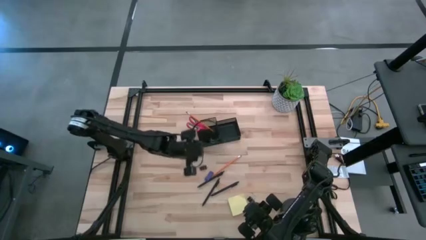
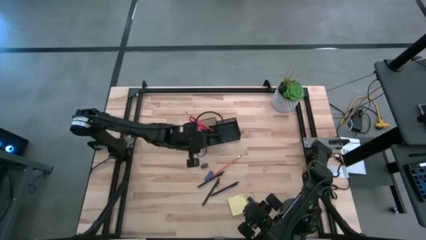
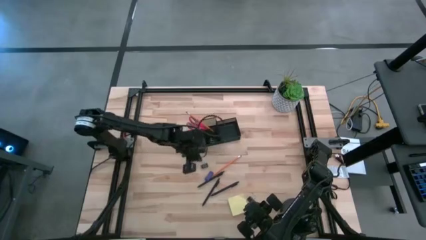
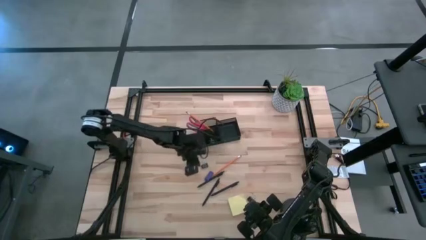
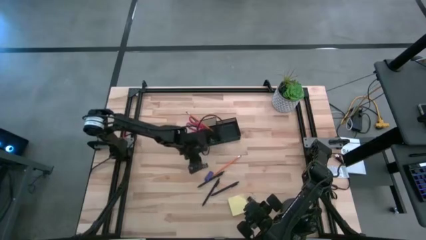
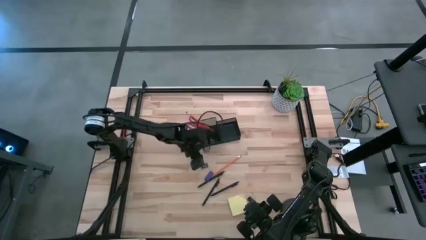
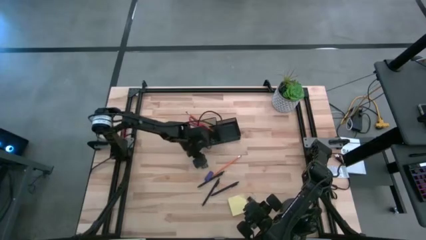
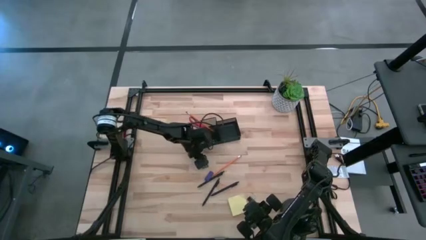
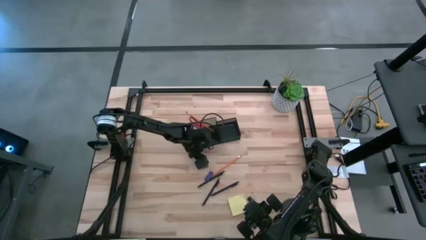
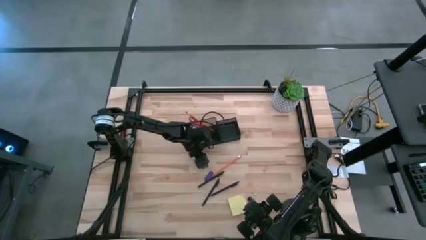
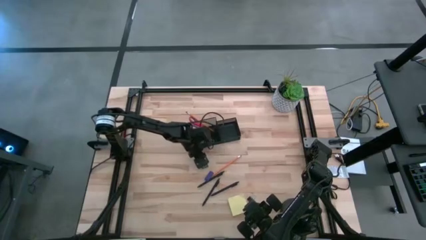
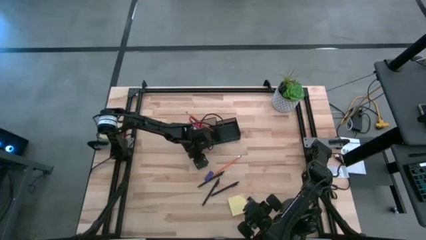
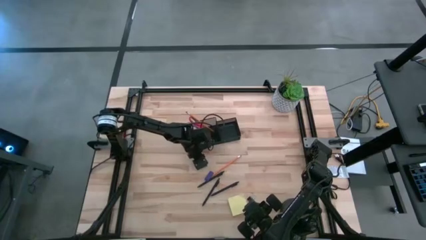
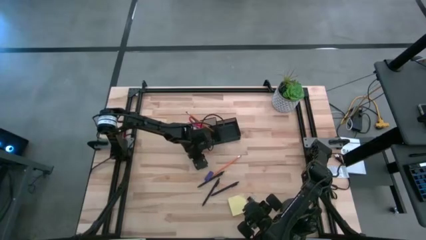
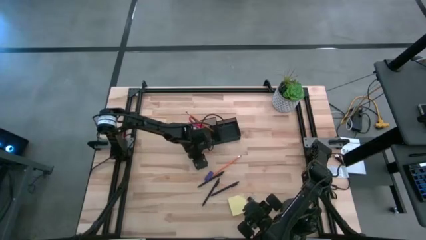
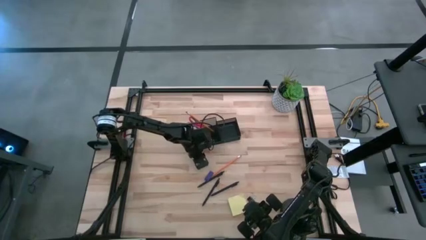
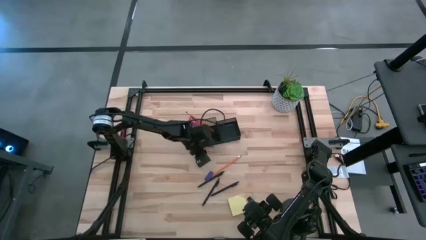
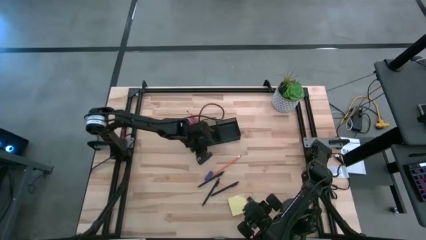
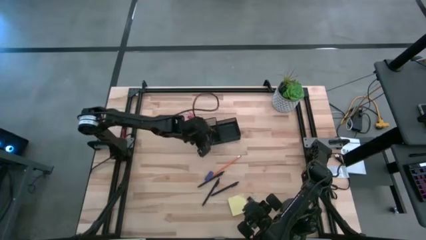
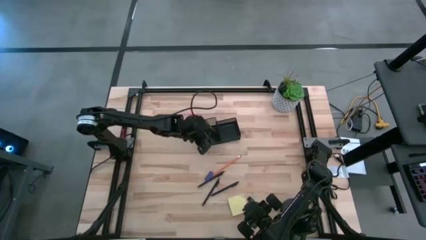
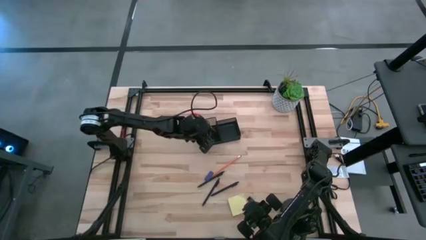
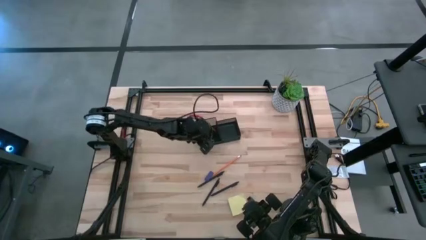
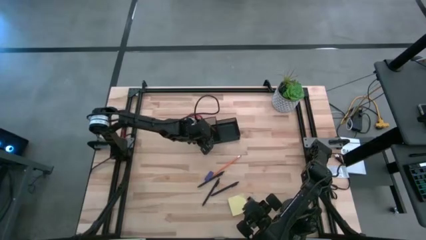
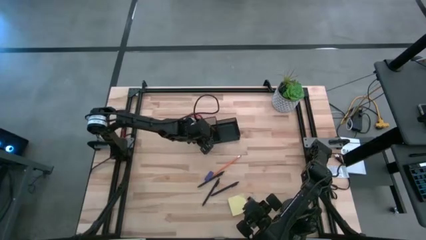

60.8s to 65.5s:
Task: Pick and place office supplies into organizer
Put the left binder clip into the bottom left section of the desk organizer

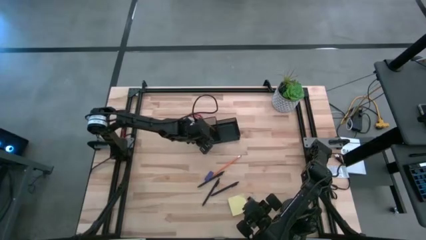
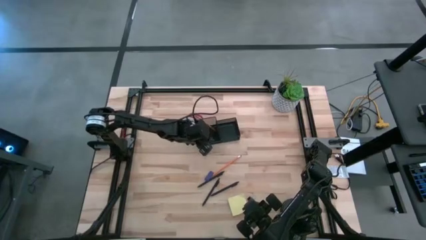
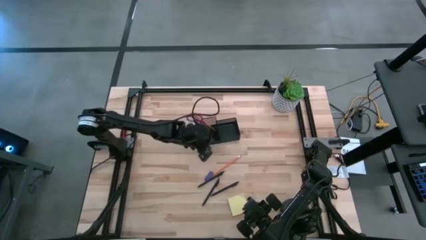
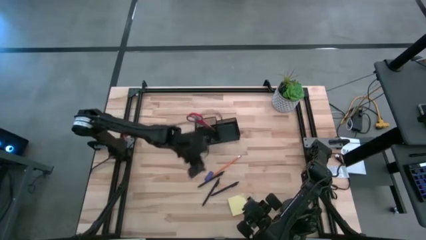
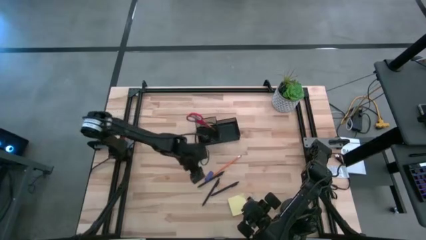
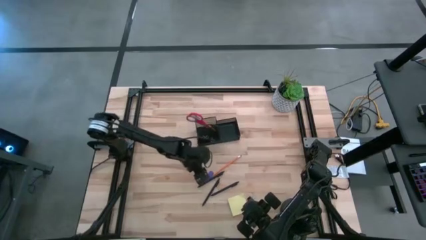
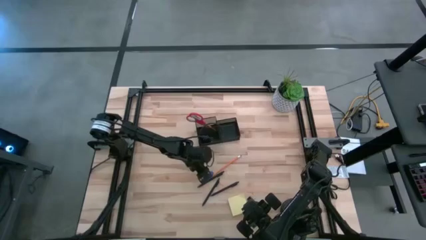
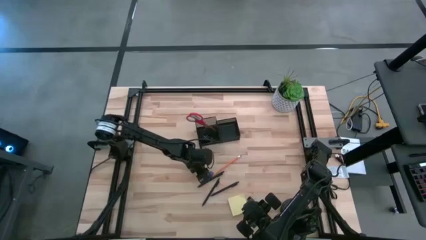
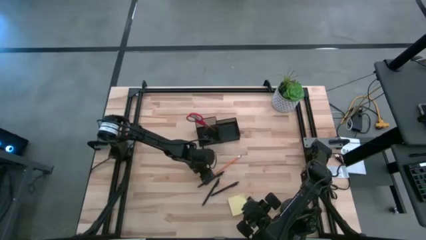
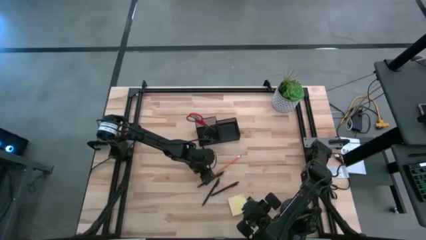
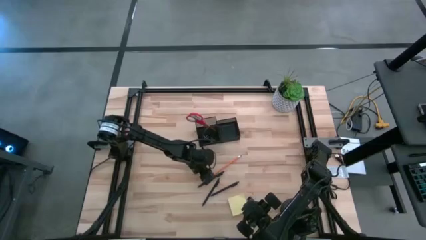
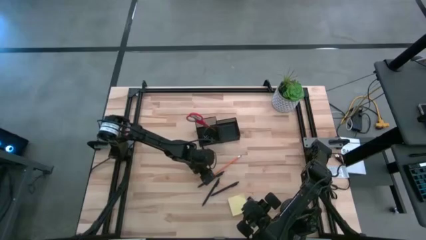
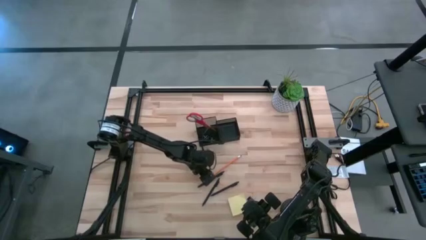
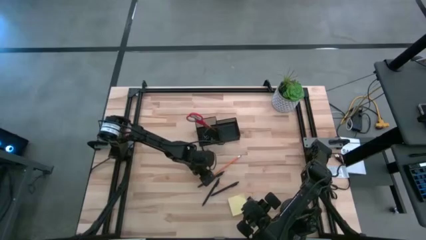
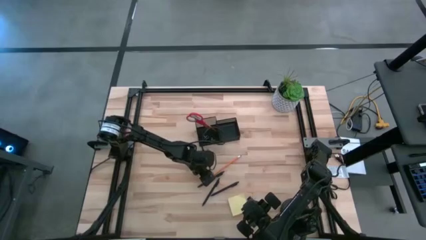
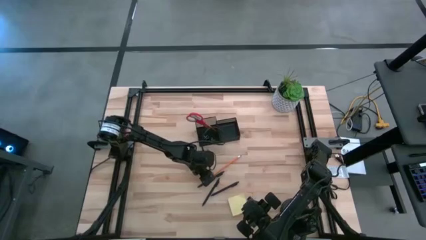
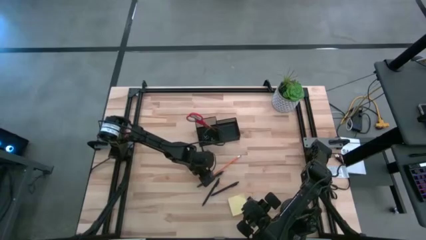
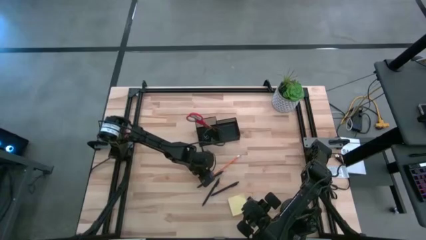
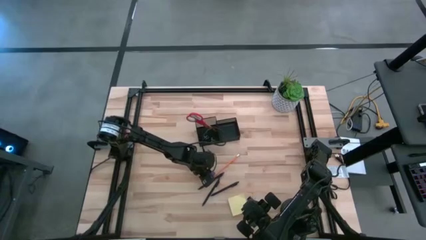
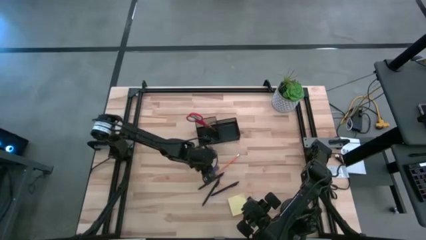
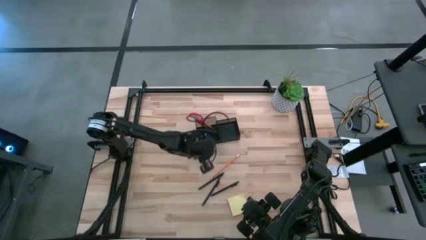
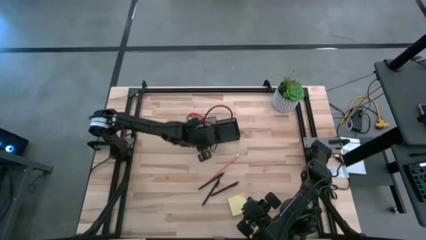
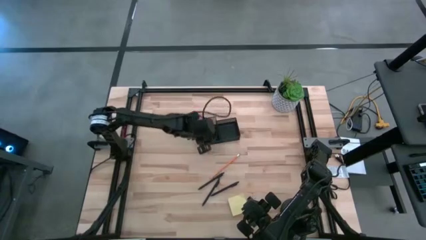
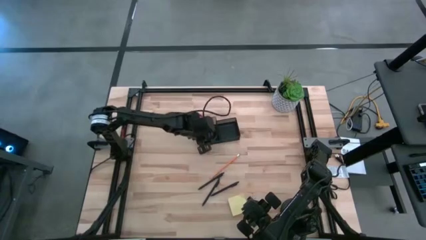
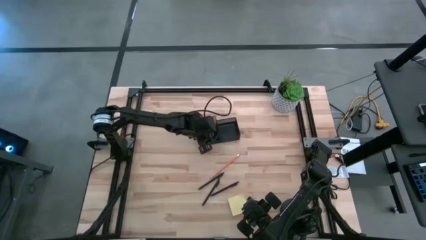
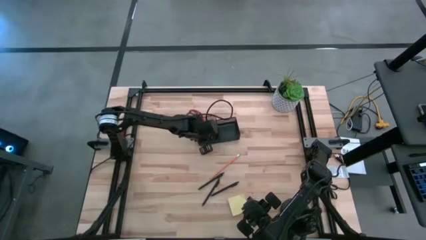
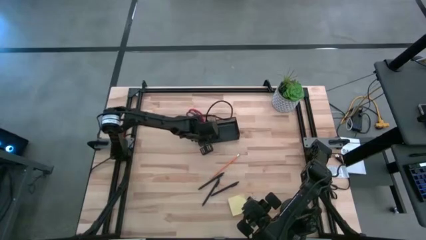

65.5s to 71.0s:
Put the eraser into the bottom left section of the desk organizer

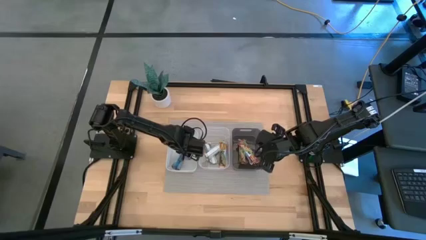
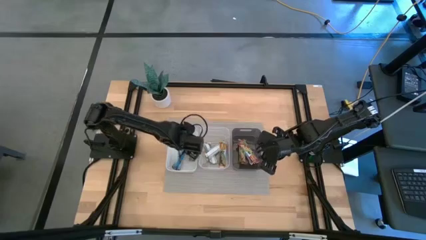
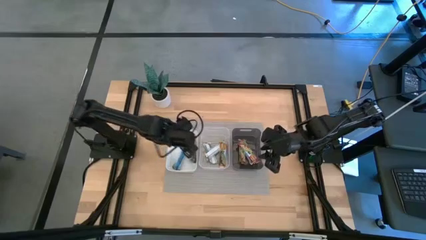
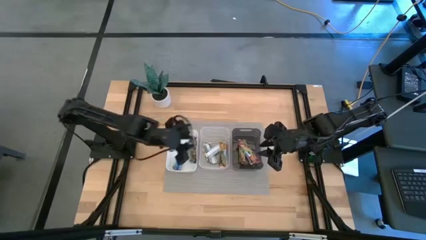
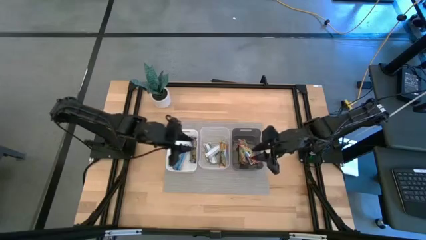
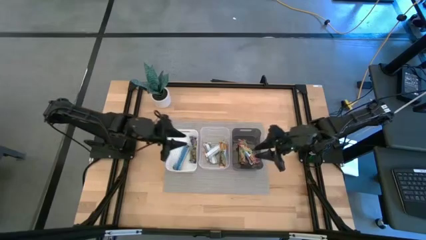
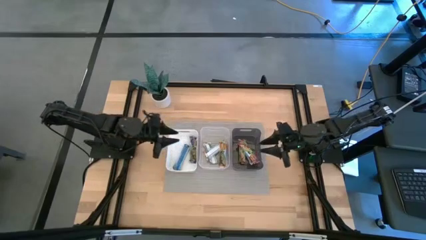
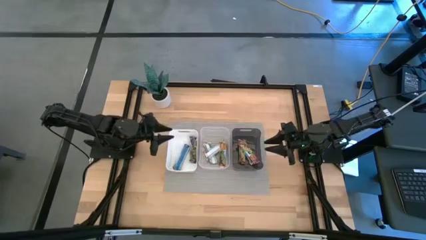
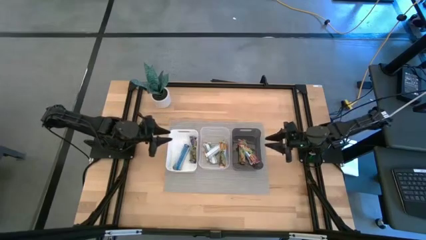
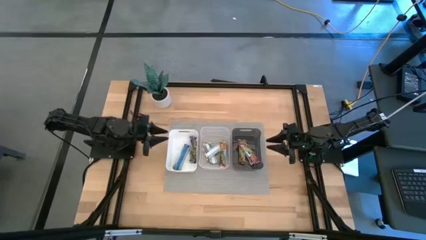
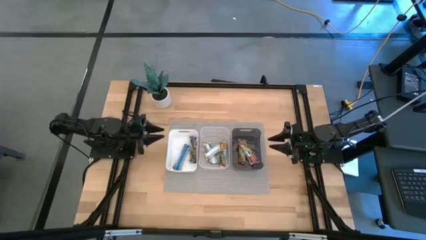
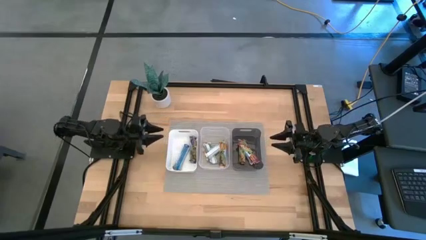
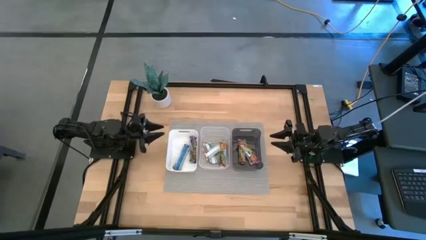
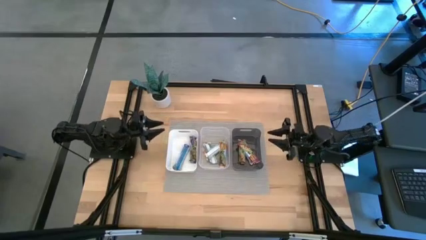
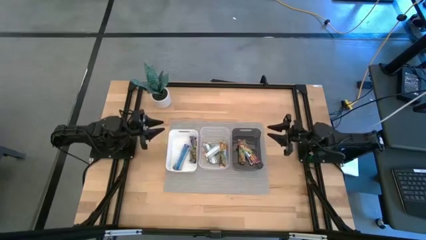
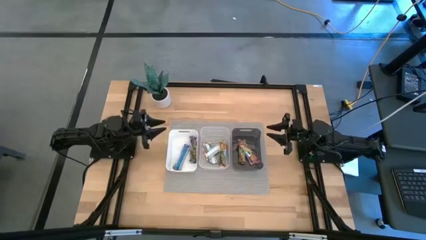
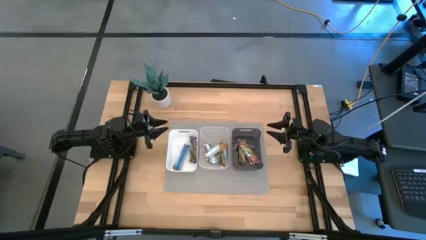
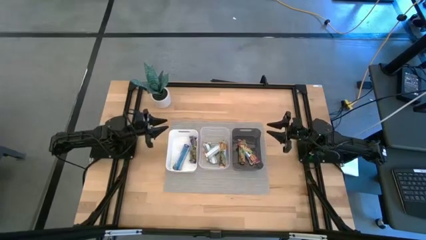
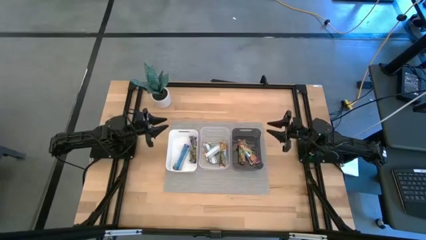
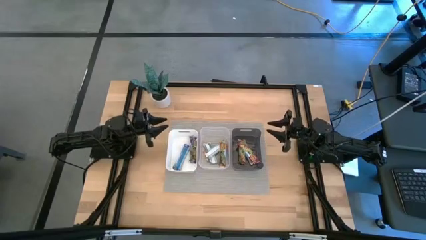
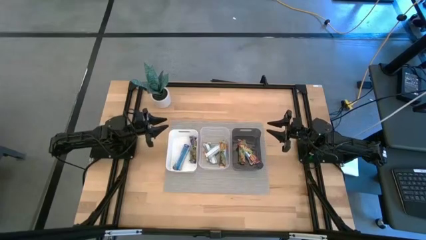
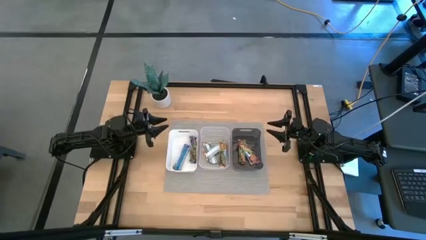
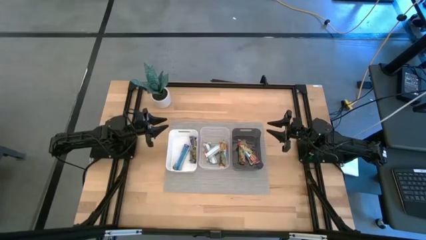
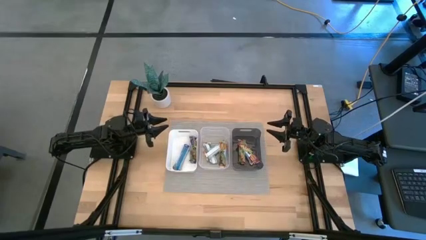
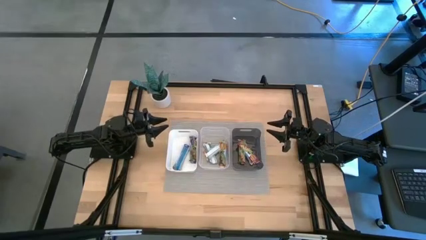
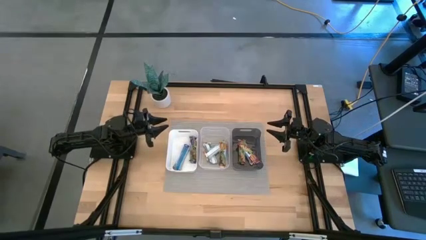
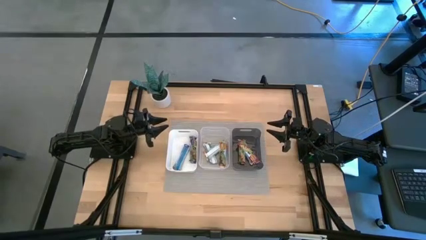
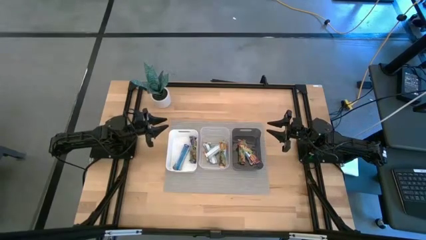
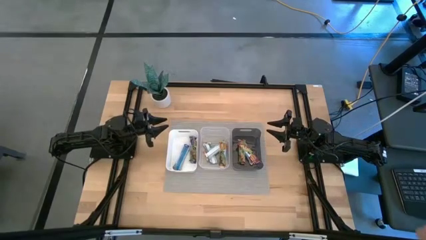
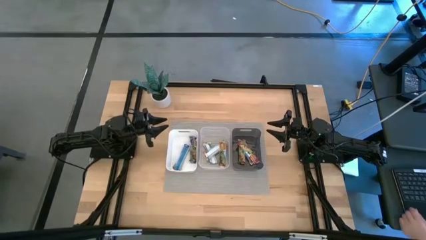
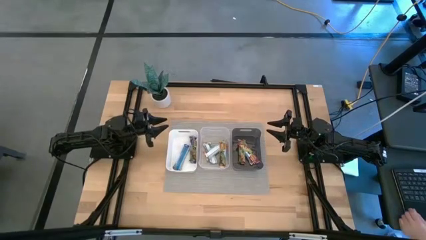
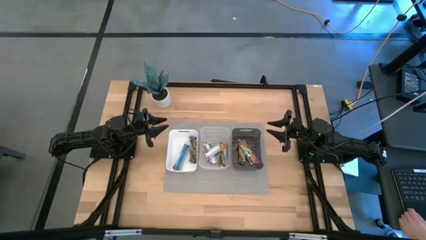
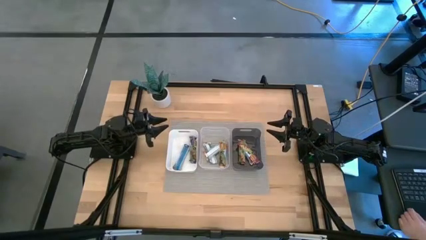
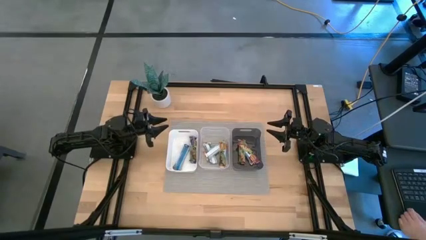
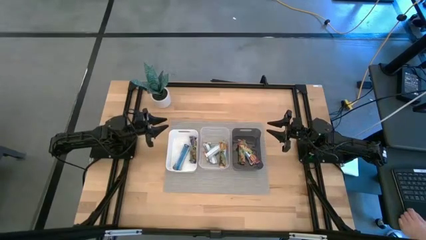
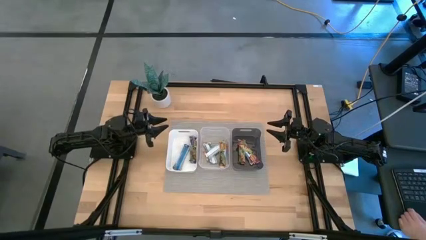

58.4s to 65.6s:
Task: Pick and place Granola Bars by type
Return to Home Position
